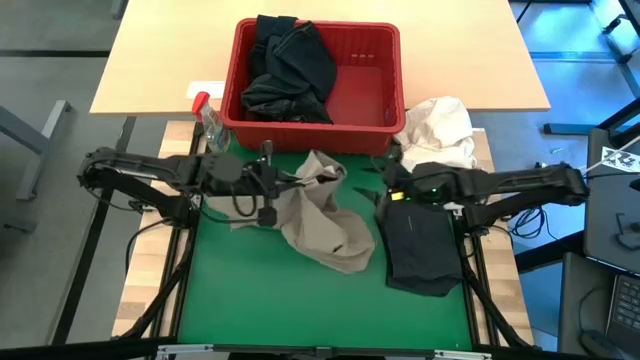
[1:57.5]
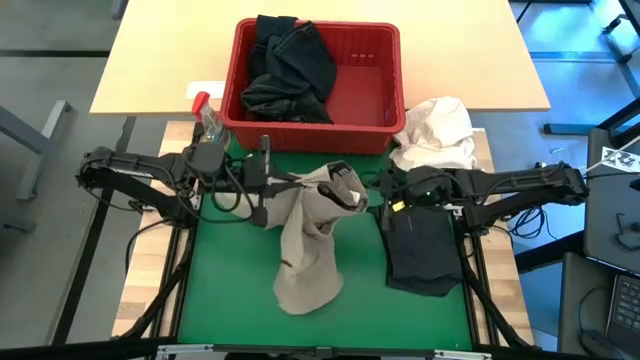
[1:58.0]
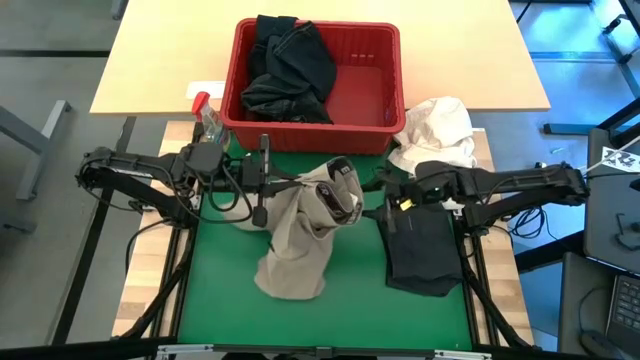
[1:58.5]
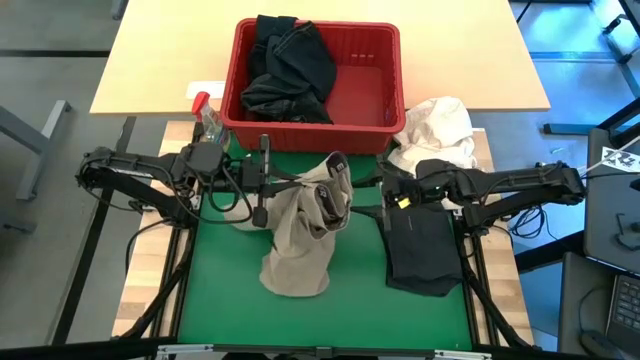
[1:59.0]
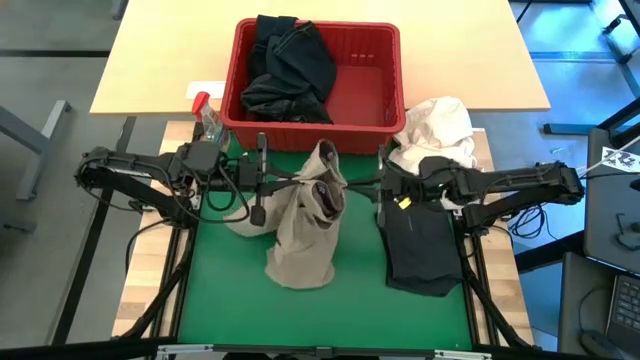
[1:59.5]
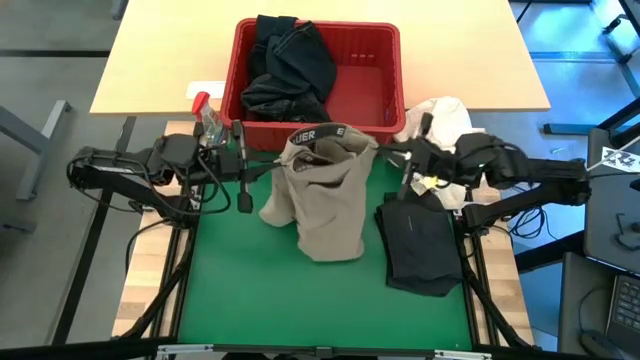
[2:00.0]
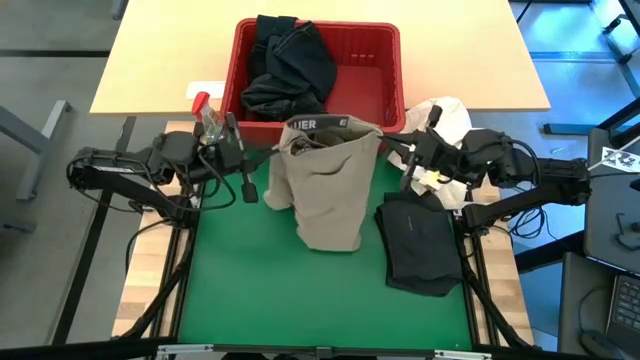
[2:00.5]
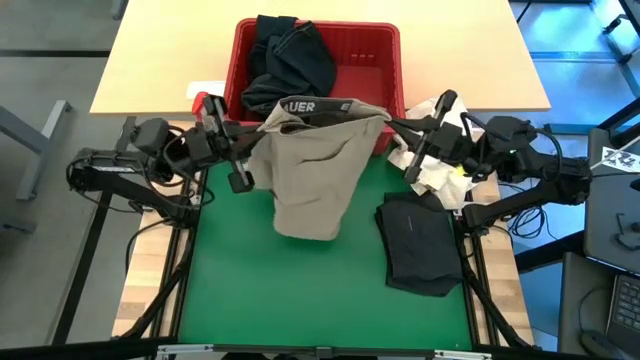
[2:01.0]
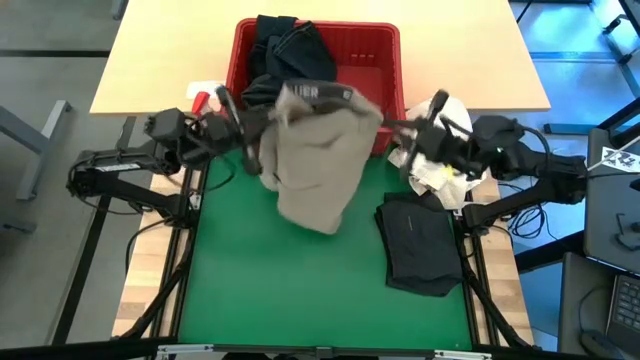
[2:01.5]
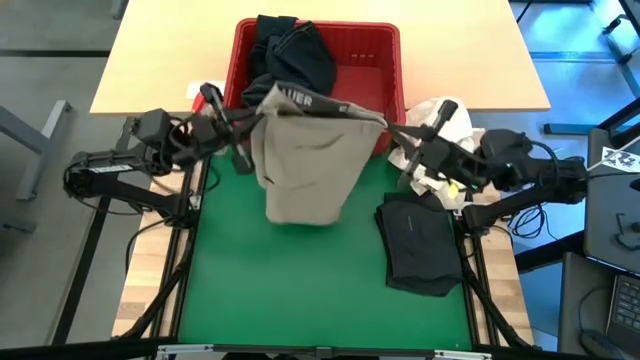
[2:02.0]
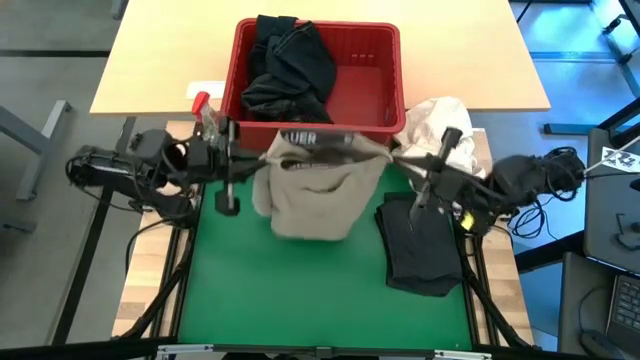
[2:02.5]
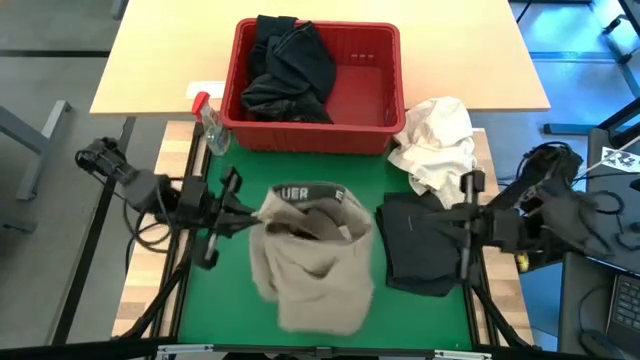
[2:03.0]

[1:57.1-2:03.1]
Task: Fold Laundry from Bin
Fold the brown shorts

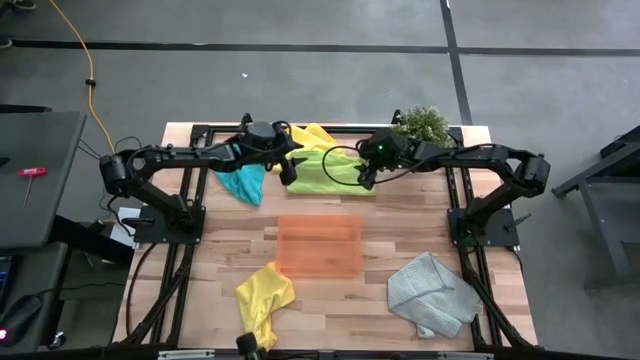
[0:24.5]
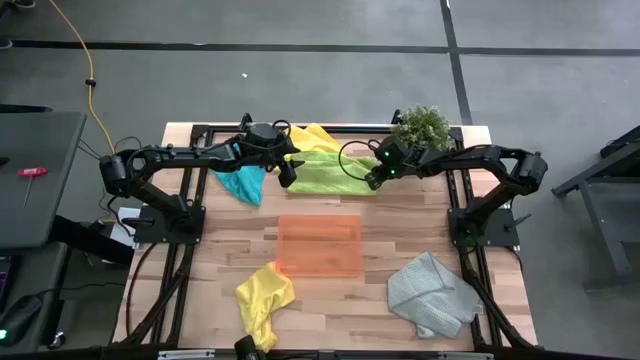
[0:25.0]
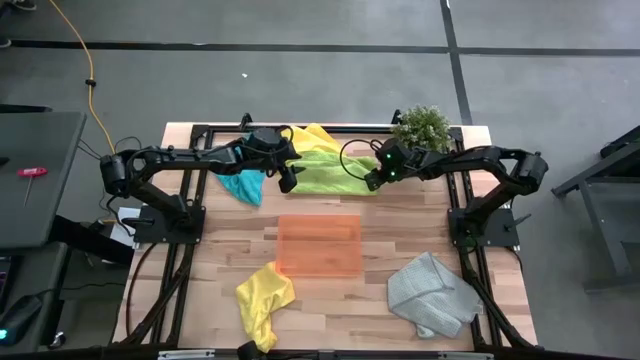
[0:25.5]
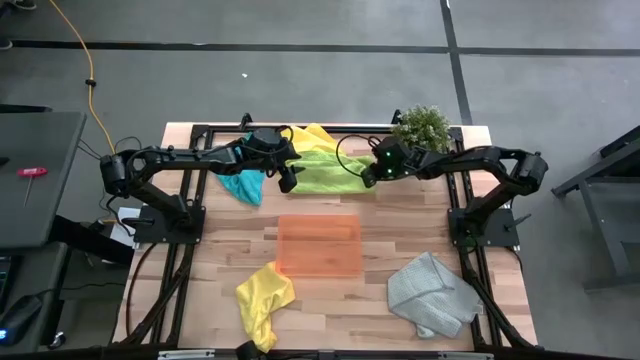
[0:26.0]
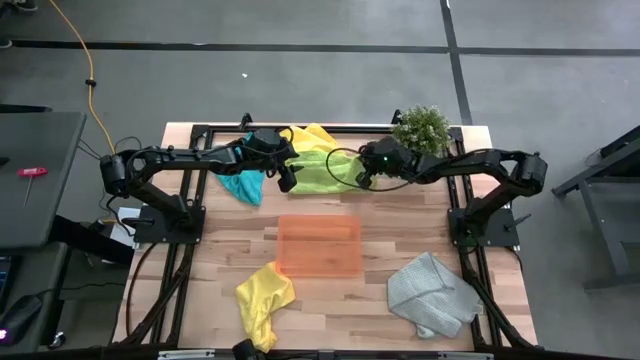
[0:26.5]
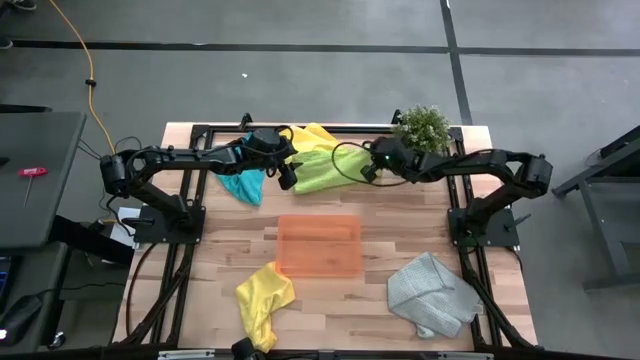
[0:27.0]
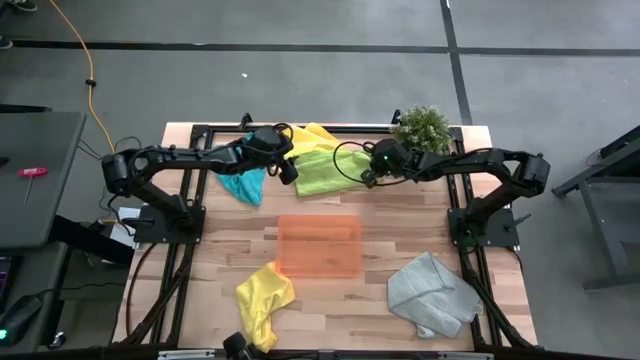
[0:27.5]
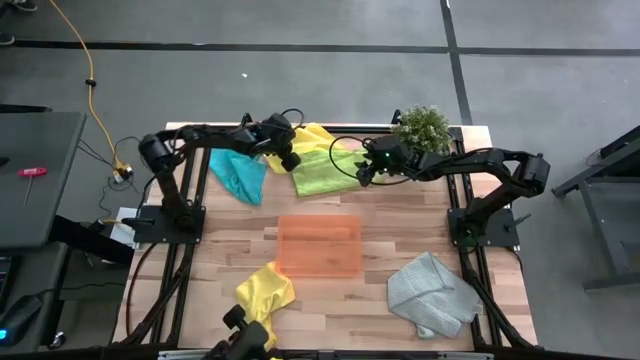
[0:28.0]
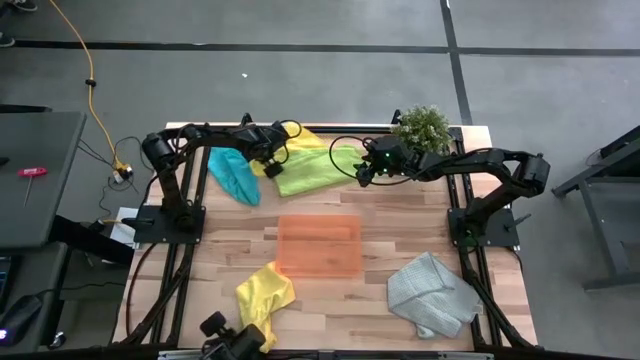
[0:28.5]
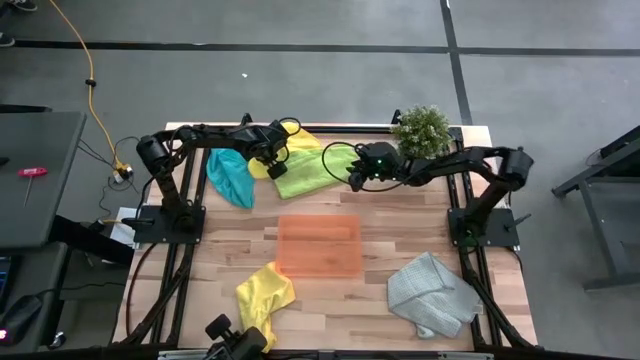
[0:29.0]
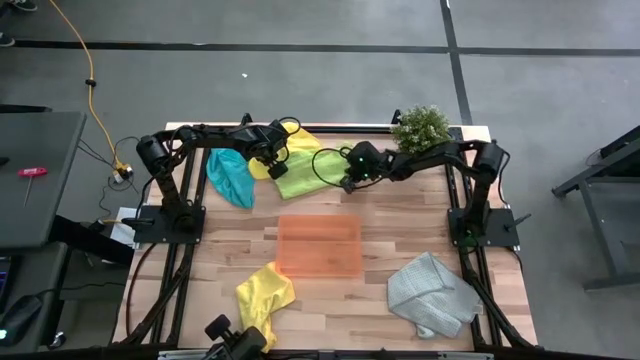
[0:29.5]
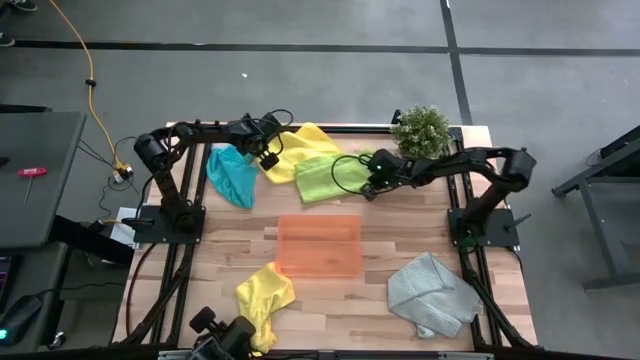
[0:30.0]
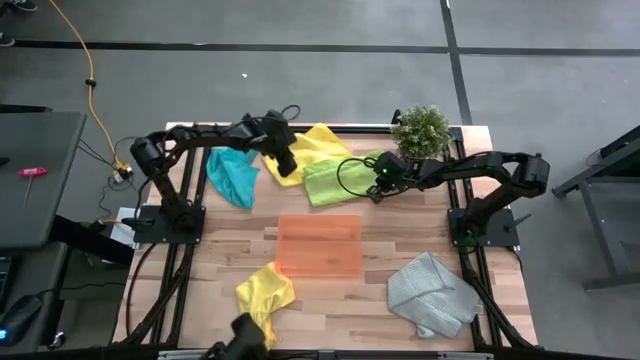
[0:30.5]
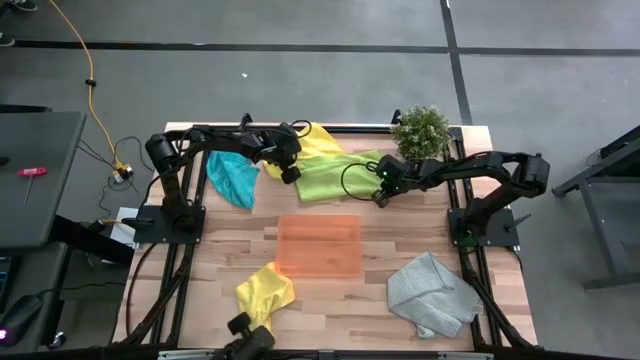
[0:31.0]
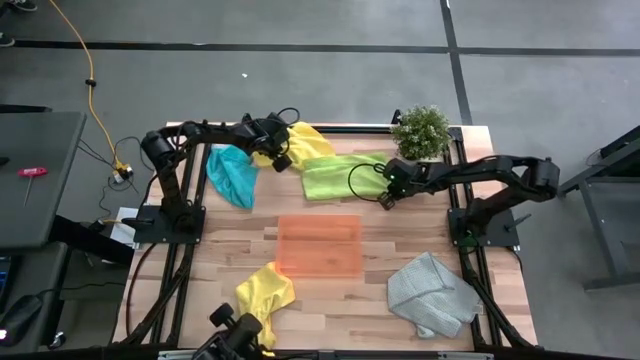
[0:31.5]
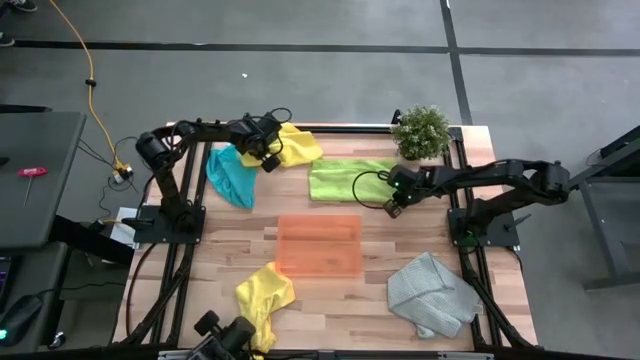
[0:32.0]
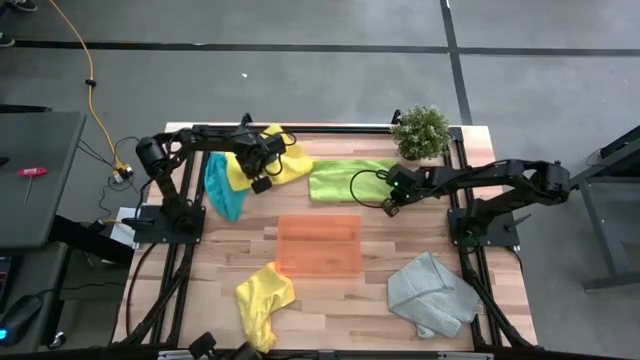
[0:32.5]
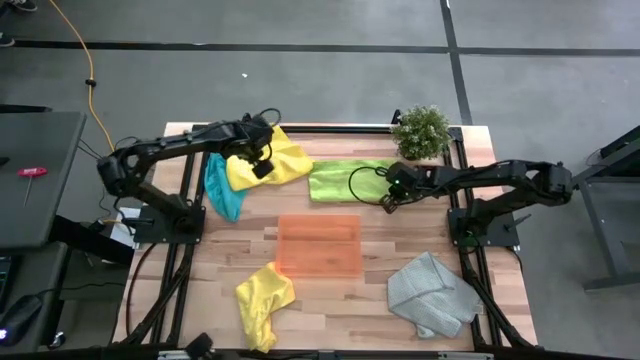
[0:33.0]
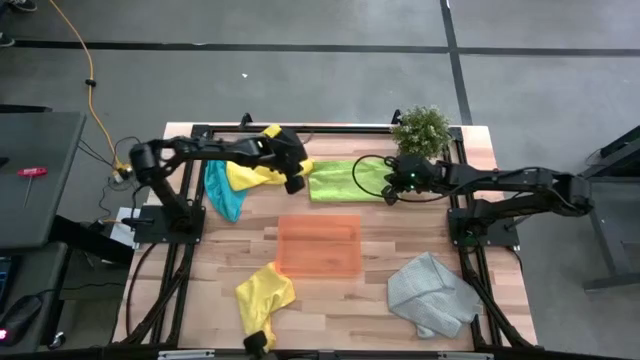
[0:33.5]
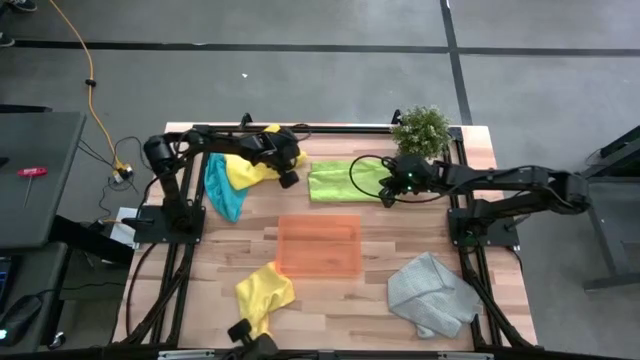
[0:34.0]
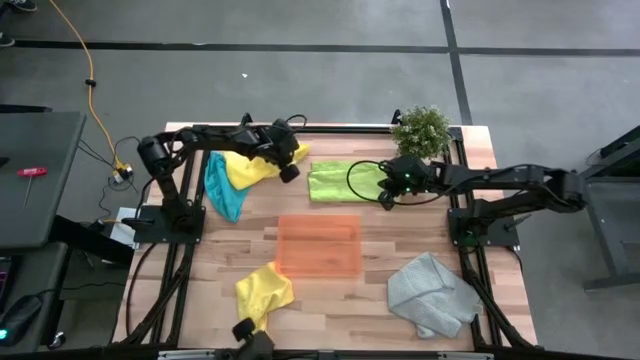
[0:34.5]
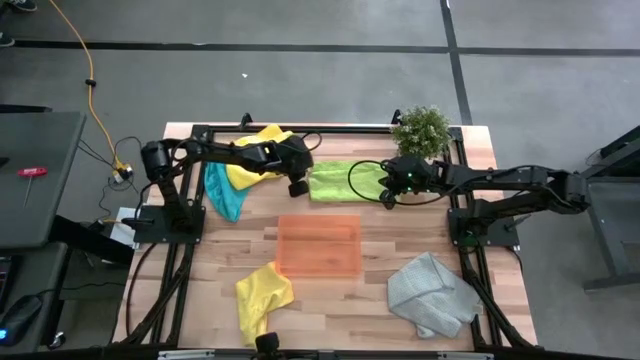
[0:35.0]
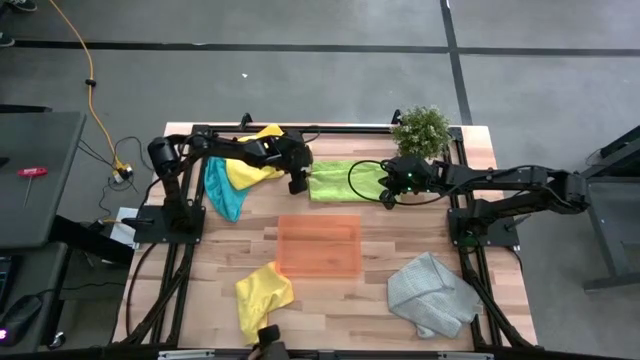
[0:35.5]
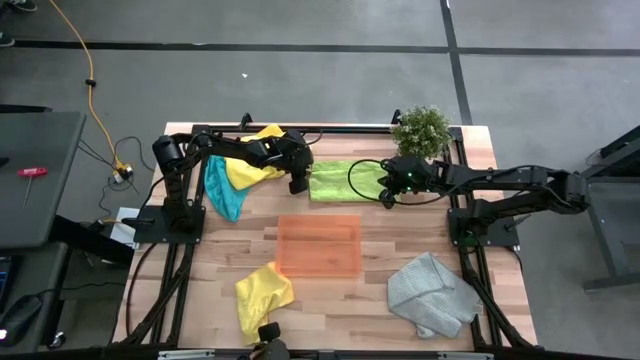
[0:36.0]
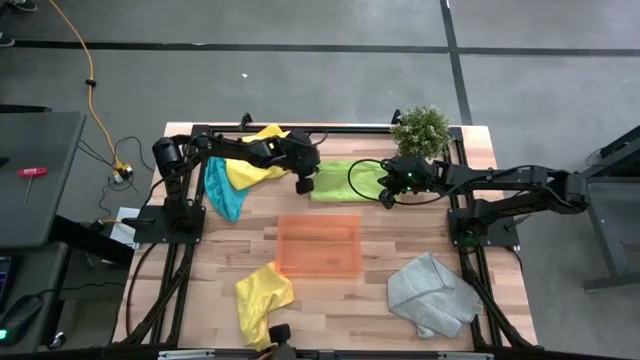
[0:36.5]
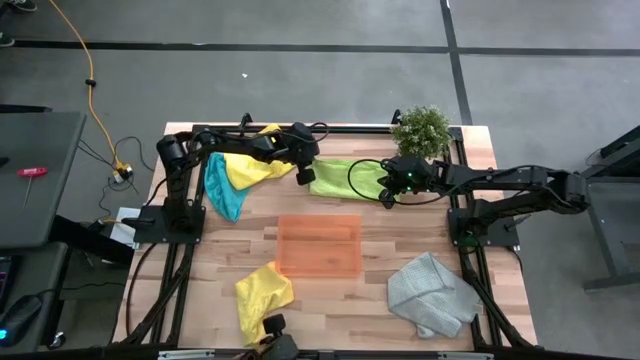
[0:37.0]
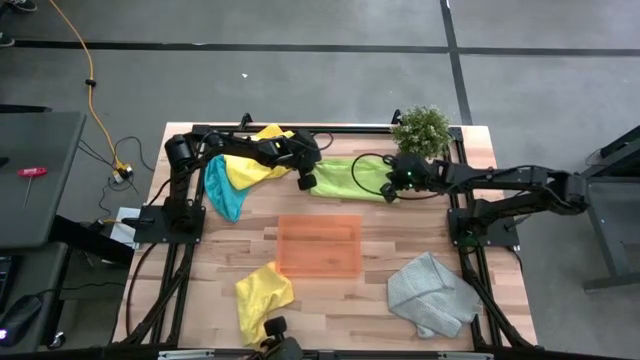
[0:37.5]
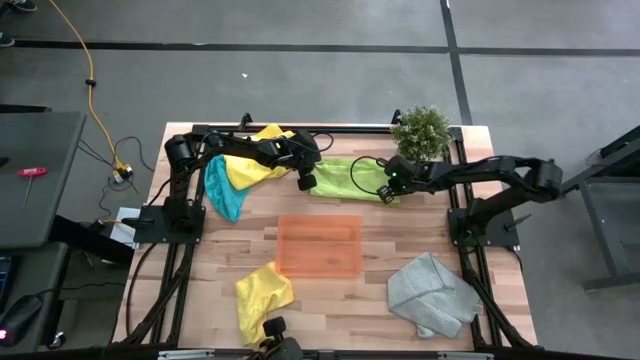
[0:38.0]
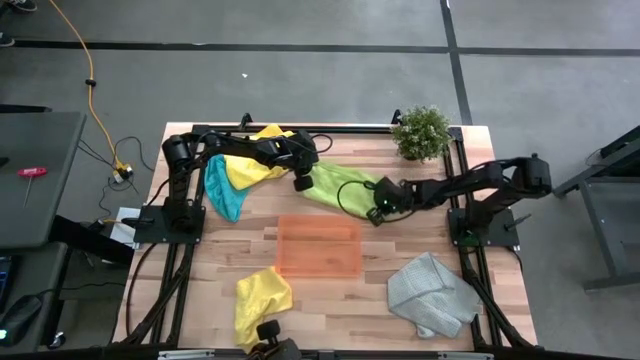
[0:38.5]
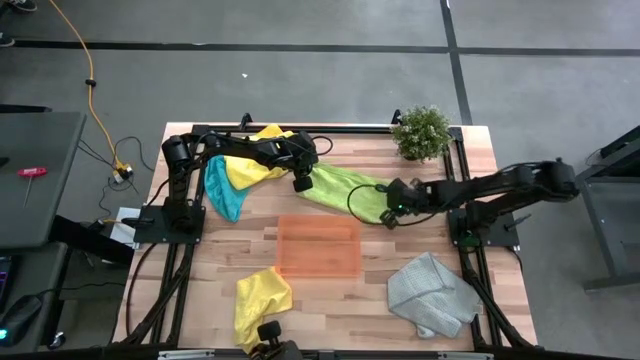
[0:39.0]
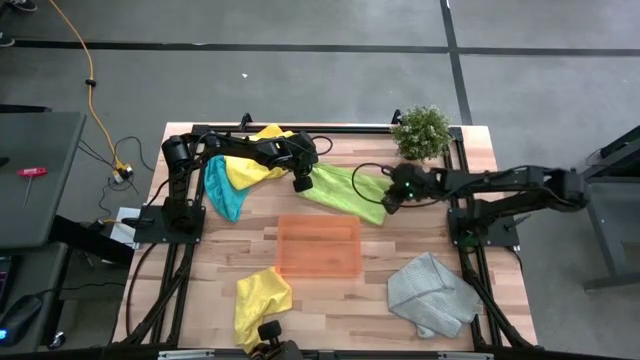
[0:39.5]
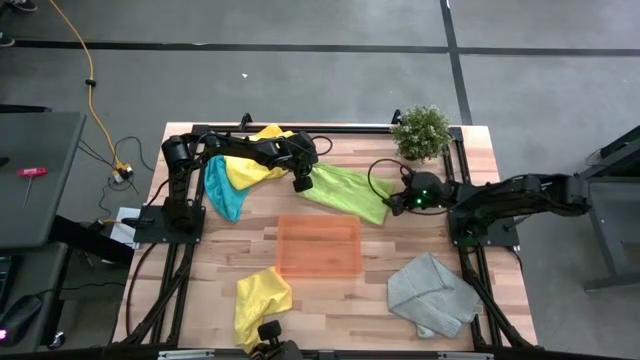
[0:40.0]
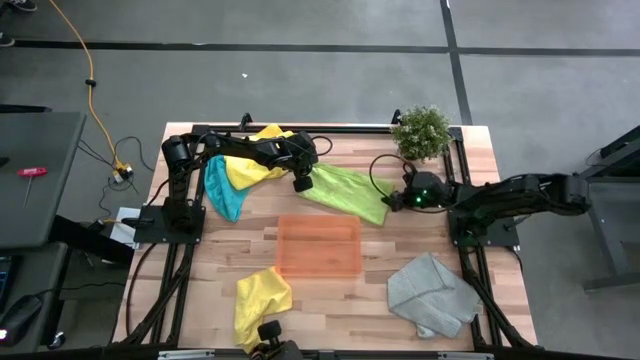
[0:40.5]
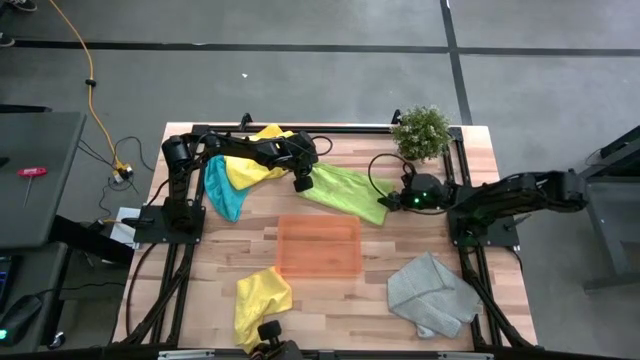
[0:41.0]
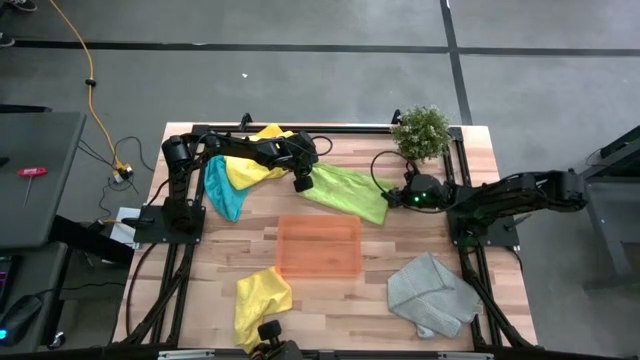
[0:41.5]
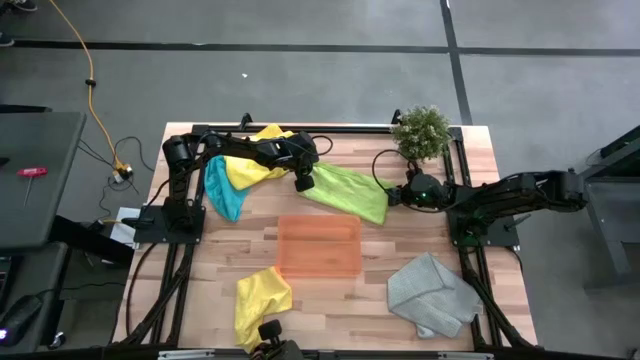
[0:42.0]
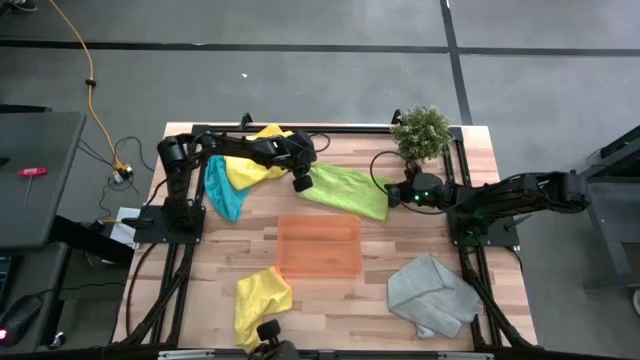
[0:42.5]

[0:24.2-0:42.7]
Task: Fold microfiber towels
Fold the green towel
